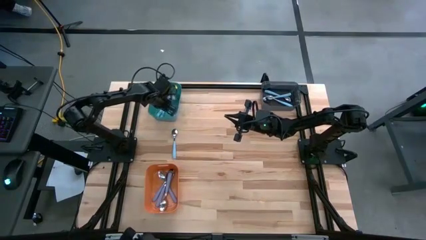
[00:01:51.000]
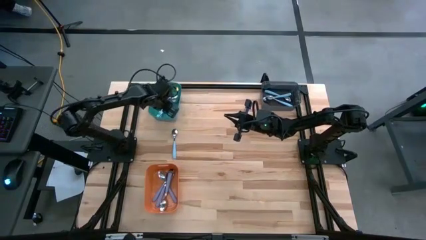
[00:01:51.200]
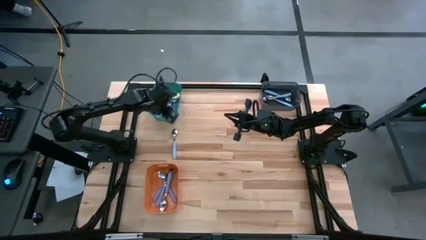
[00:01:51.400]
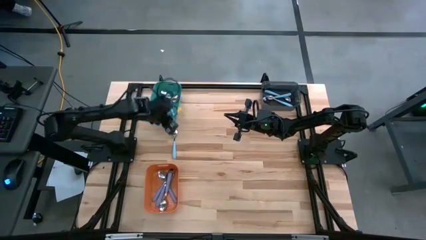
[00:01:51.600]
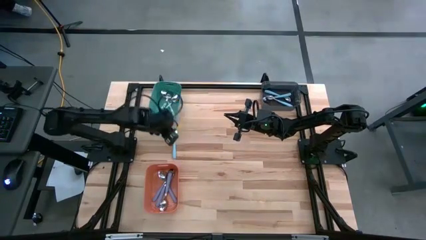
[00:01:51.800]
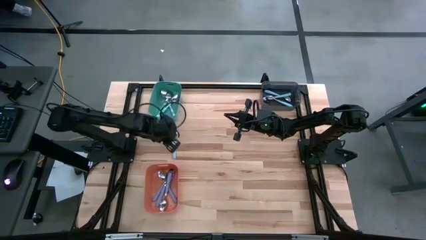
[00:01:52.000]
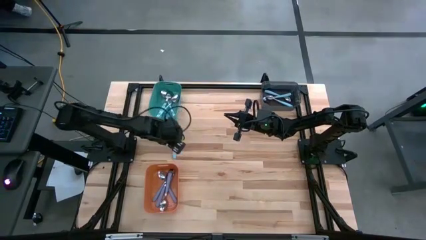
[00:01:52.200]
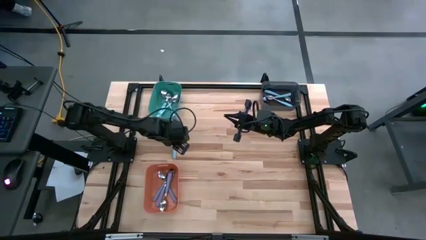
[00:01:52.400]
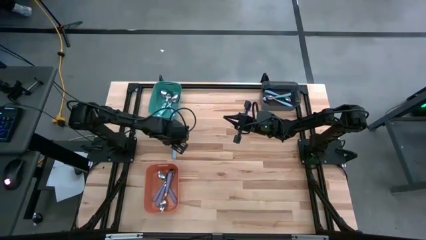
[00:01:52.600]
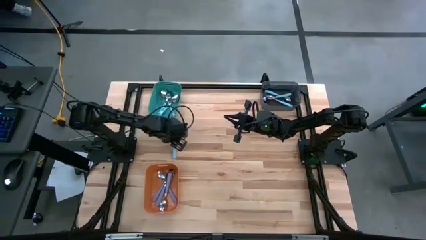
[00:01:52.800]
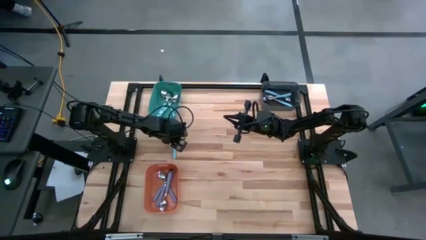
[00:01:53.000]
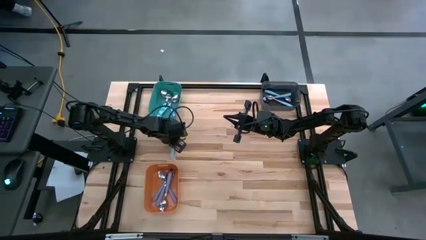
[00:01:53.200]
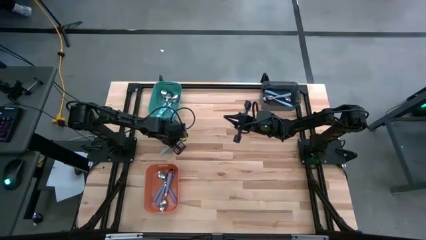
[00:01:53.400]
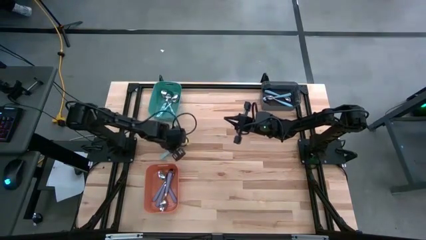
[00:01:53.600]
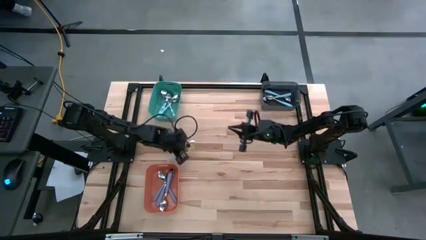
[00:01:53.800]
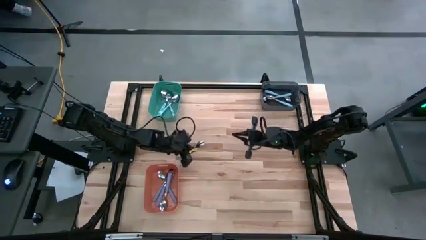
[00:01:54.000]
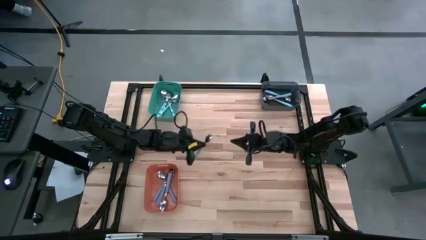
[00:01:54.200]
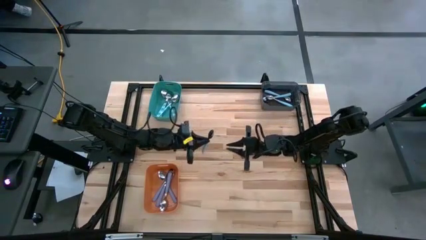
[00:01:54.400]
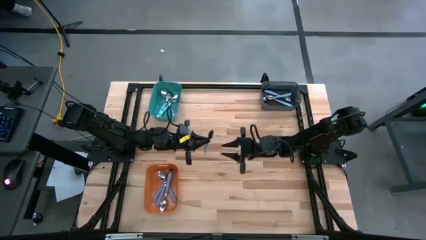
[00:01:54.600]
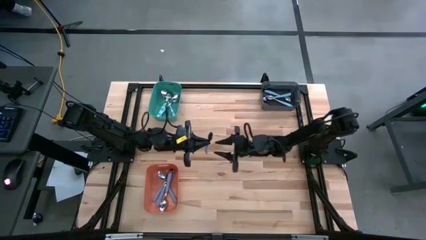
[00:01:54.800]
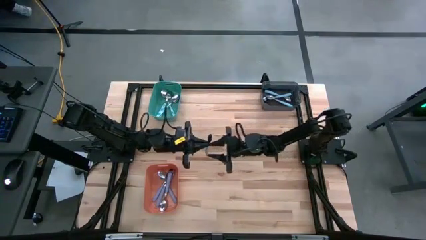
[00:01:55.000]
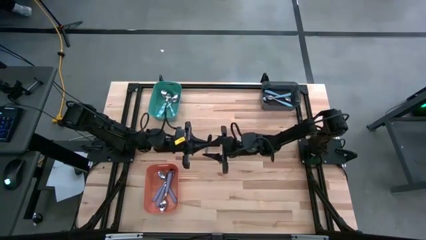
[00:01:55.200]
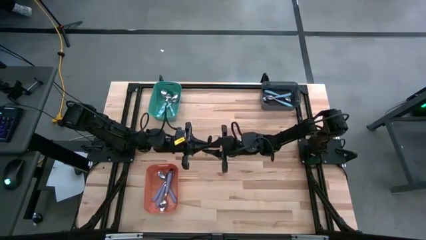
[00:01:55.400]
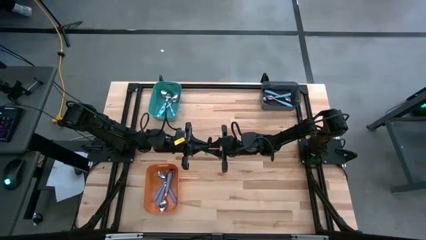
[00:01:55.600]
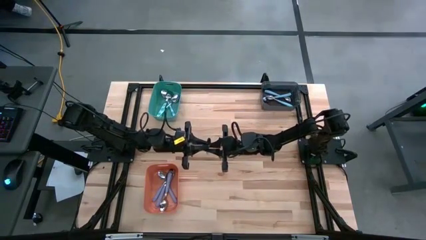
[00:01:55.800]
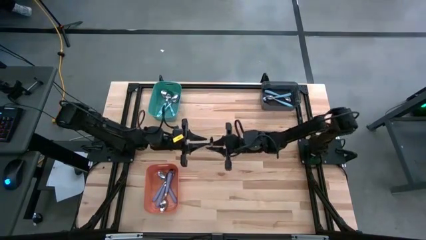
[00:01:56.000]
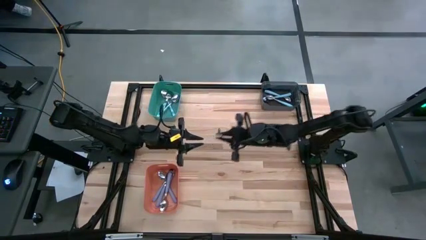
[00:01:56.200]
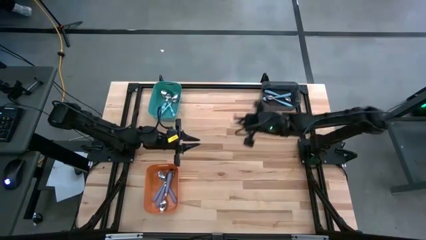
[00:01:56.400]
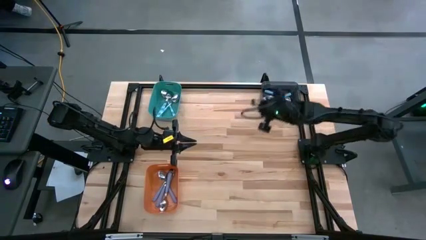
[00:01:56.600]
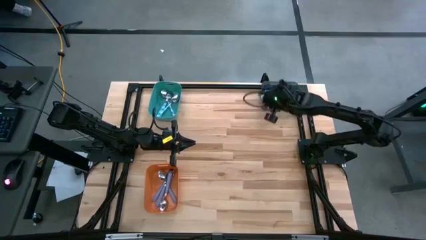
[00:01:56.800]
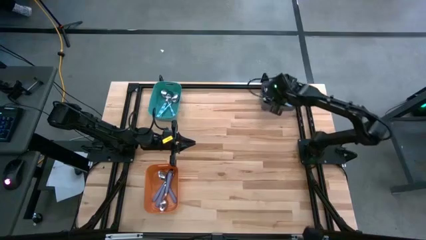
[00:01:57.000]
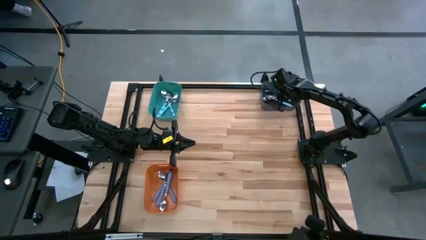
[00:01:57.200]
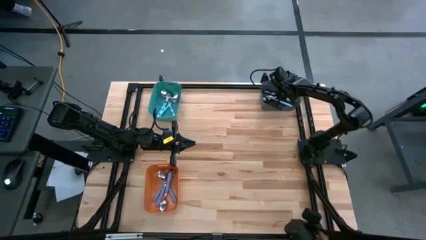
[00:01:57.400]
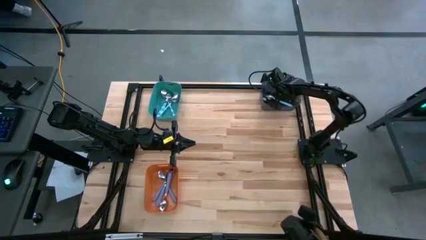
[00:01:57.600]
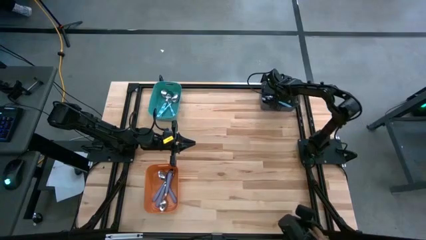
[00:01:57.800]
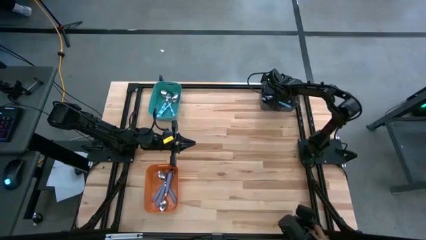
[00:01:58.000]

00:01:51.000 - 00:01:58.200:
Task: Sort silverware by color (type)
Put the light blue spoon into the black bin

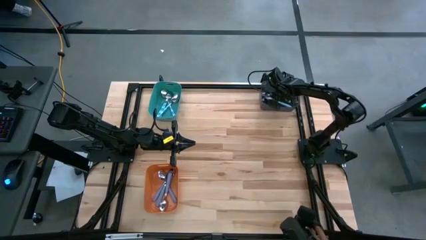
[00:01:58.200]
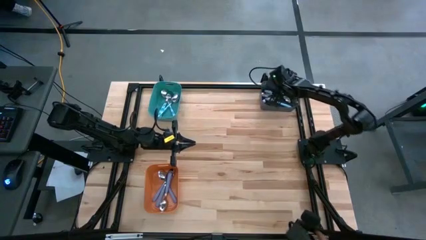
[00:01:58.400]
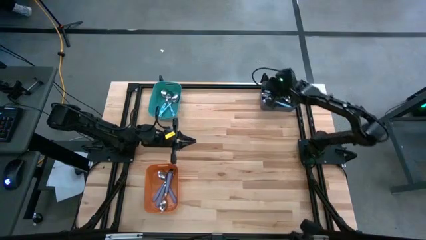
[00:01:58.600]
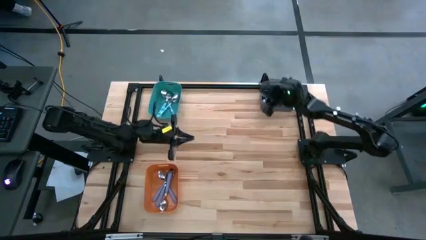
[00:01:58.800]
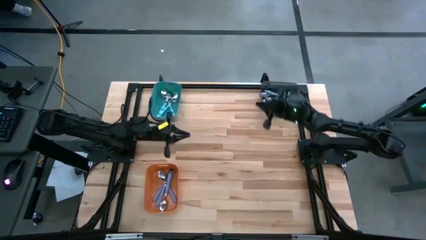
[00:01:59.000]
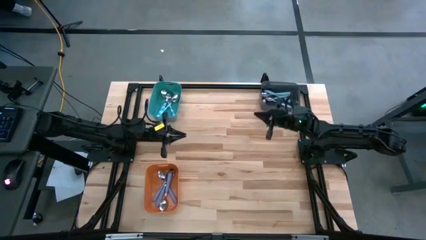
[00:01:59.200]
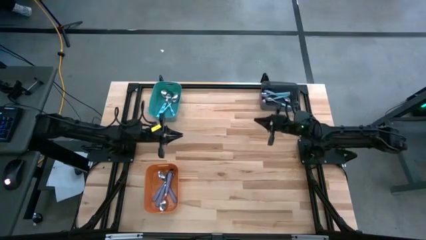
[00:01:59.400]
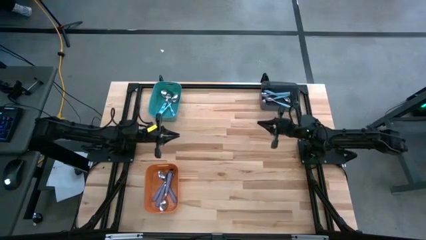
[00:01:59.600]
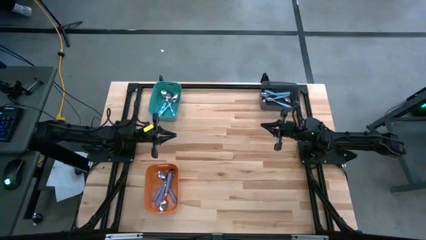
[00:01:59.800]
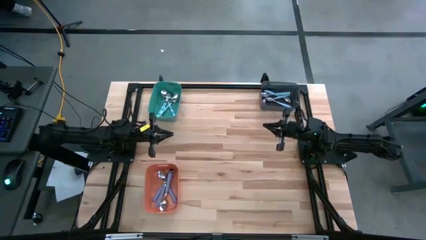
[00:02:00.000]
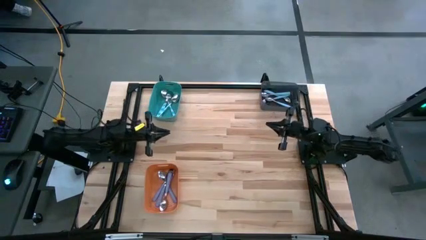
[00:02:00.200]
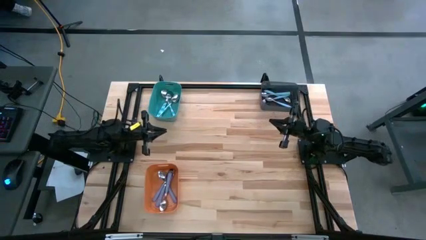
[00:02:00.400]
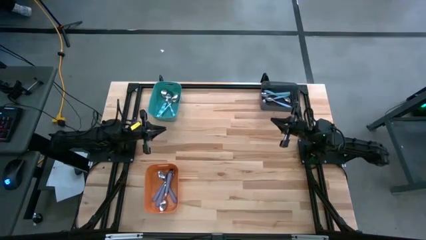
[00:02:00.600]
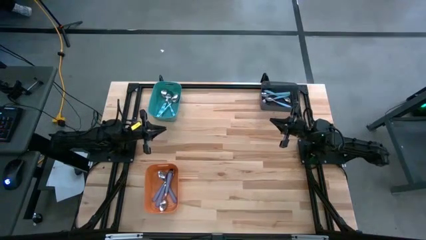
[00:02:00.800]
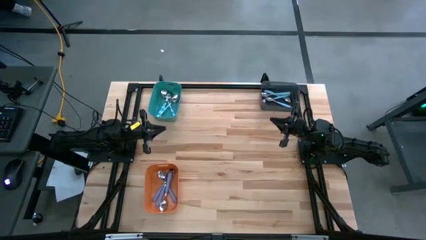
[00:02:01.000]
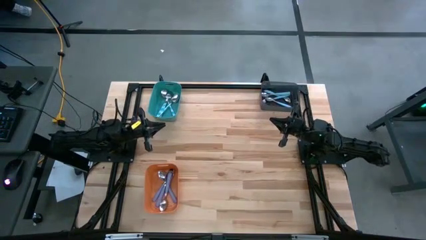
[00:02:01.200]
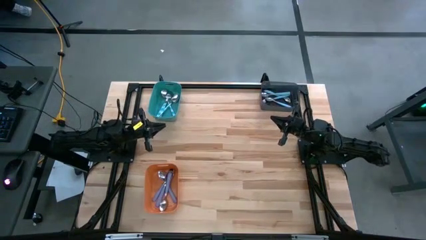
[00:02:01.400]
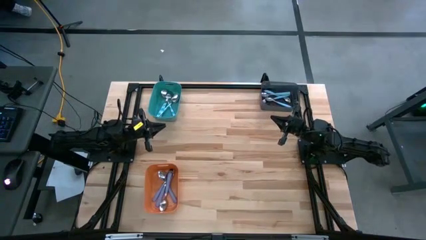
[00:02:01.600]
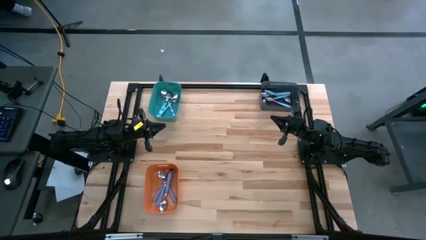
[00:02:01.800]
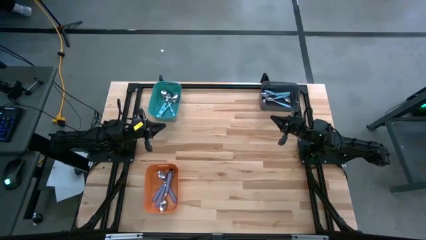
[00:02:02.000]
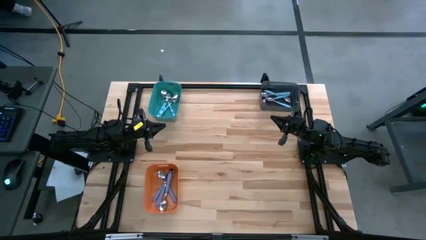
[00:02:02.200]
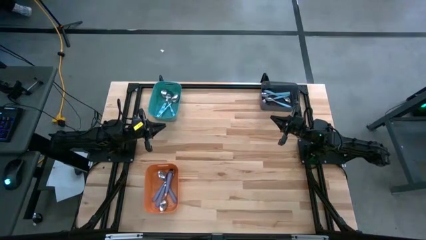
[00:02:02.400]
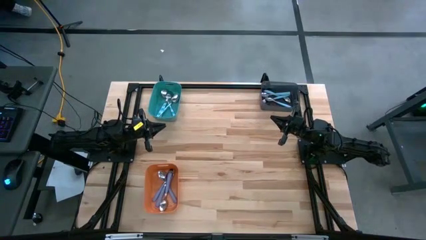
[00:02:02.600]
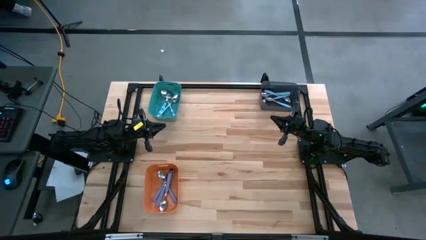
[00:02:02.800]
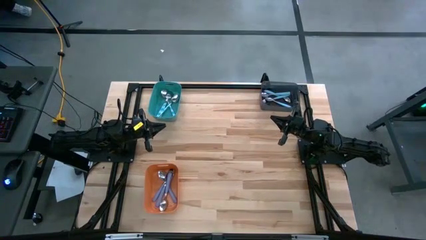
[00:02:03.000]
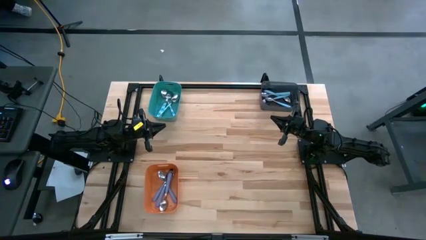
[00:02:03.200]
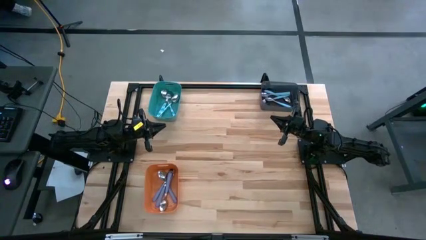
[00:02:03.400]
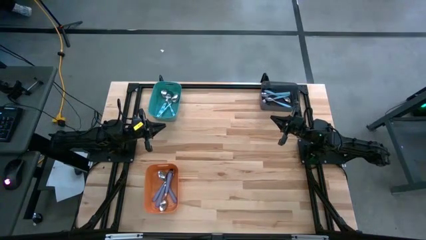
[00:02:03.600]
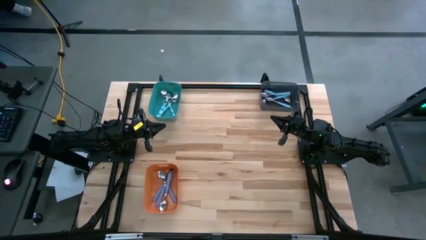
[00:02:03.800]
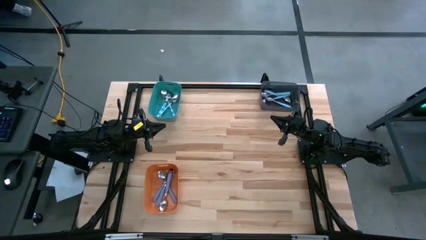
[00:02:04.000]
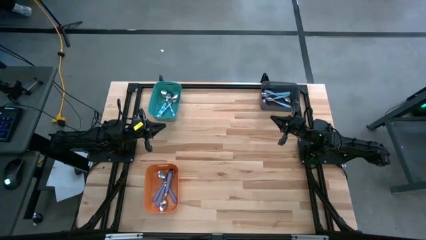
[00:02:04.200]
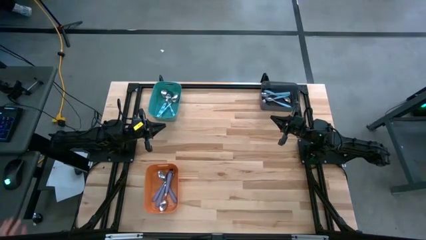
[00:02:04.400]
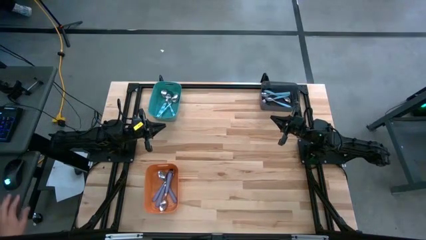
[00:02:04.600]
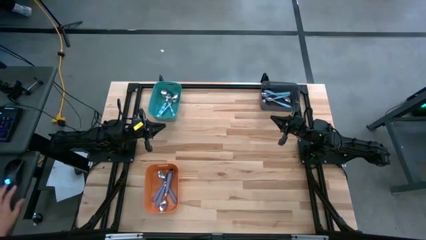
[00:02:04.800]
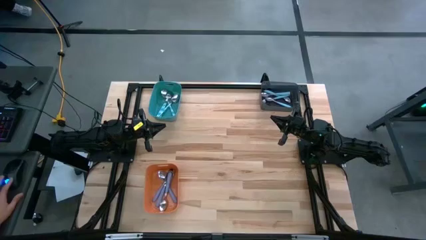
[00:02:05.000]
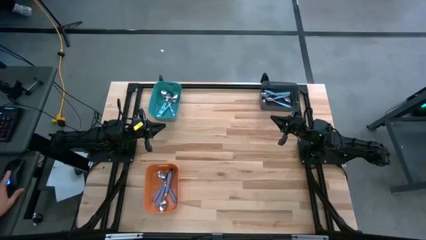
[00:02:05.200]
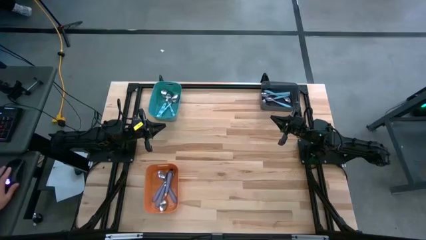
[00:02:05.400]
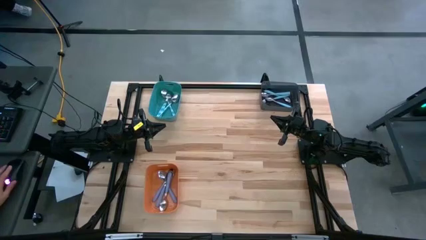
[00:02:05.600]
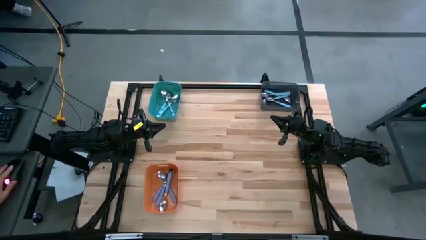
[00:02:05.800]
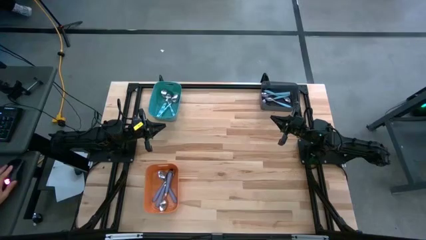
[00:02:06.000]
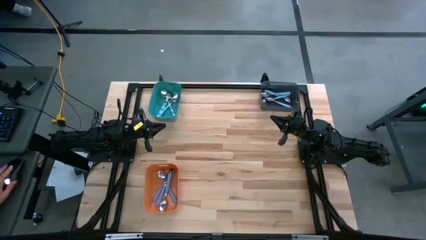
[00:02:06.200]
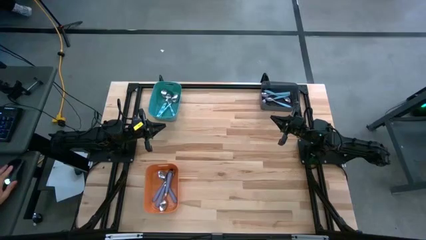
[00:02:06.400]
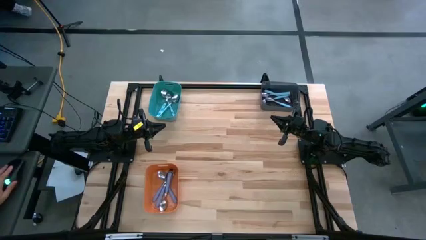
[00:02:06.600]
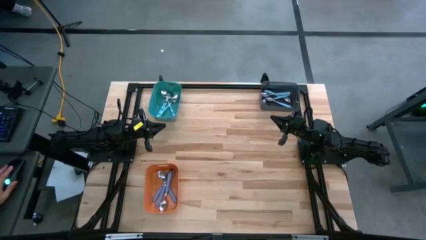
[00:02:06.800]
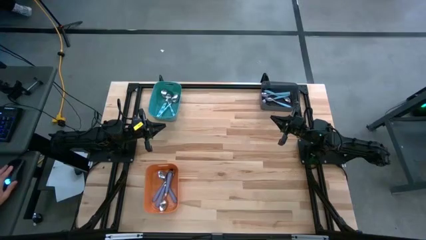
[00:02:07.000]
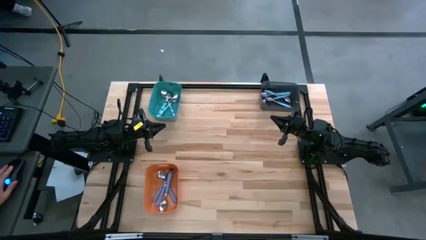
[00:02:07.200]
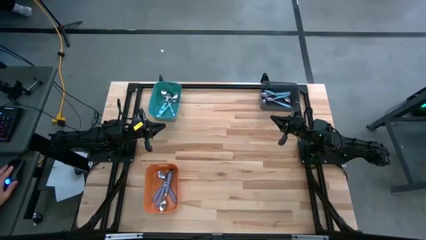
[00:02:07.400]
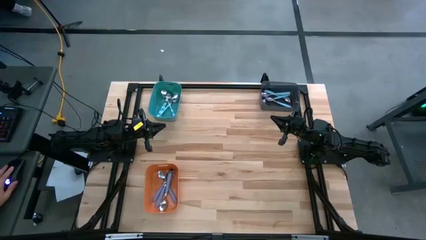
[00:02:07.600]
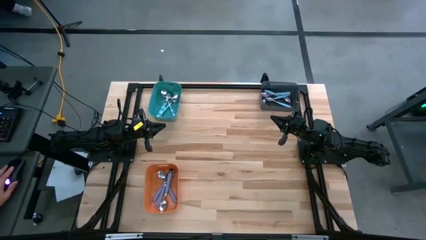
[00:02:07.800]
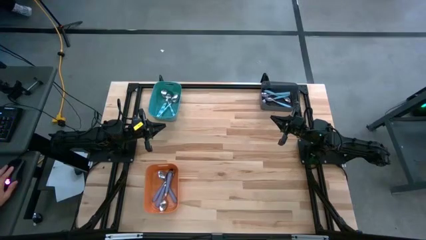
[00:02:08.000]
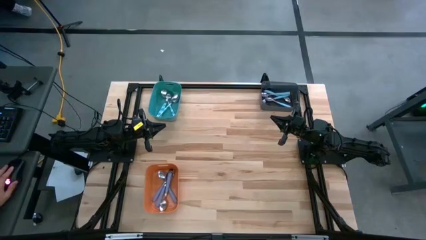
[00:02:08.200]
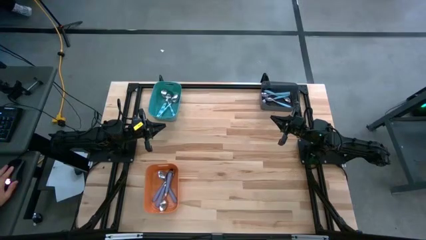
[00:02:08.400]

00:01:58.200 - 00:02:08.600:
Return to Home Position
